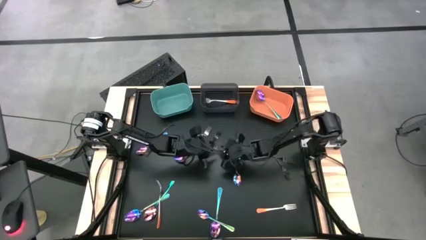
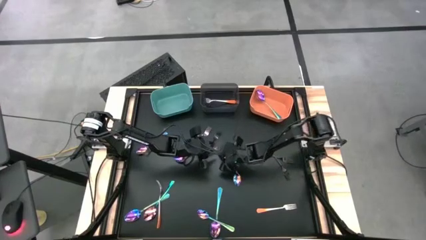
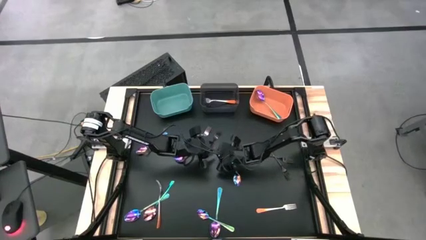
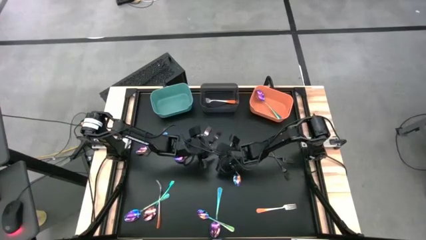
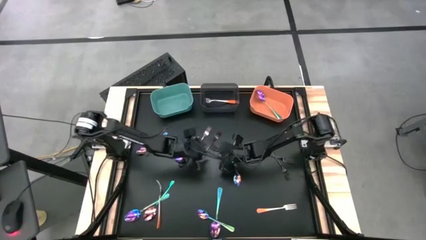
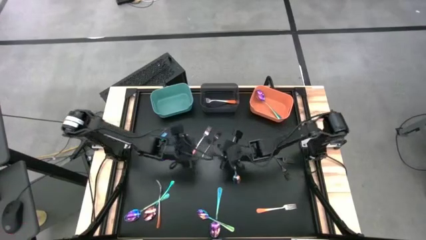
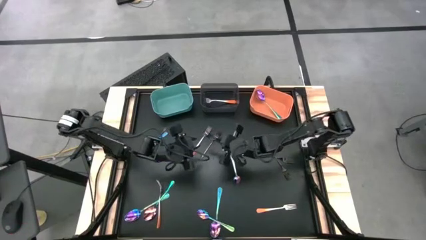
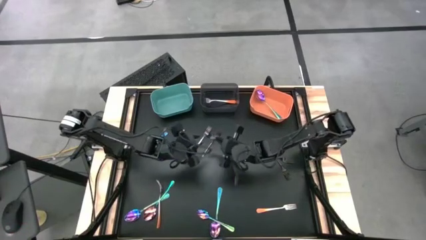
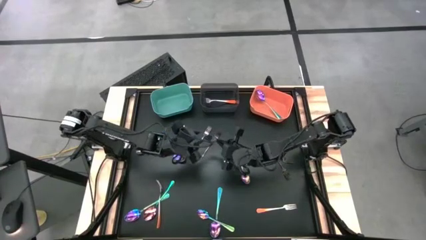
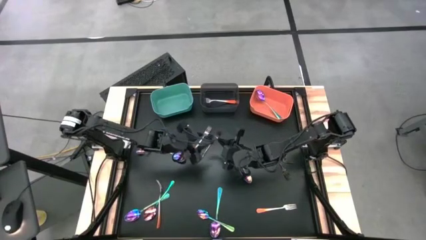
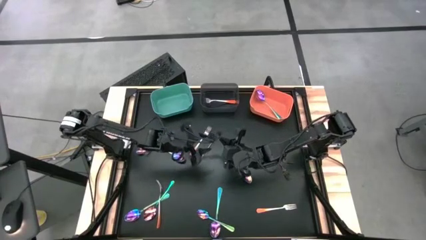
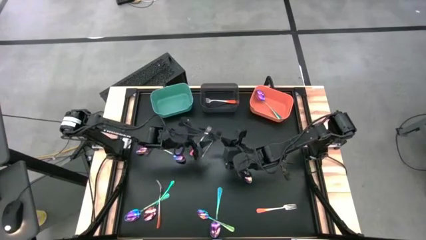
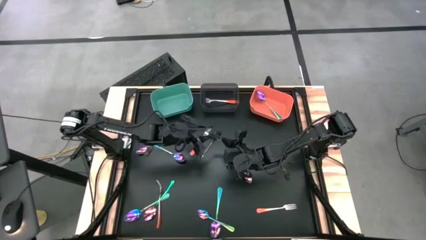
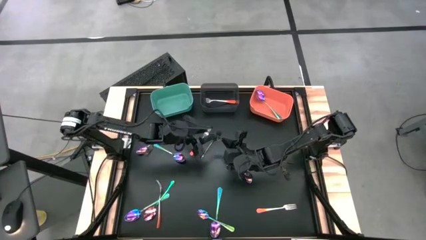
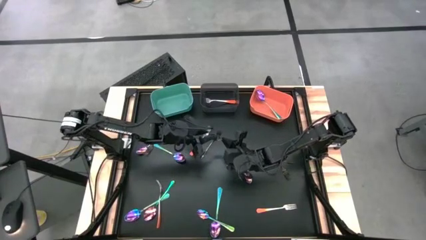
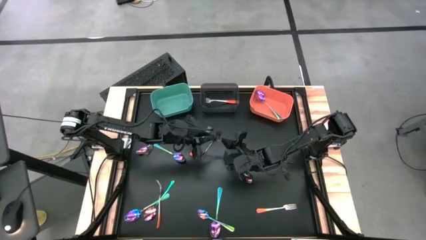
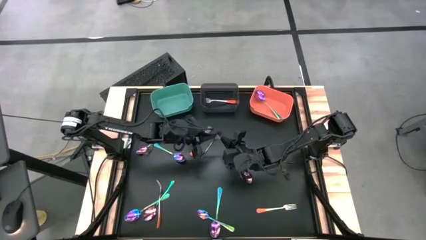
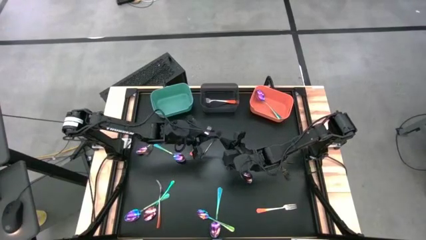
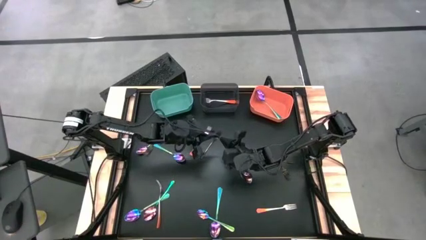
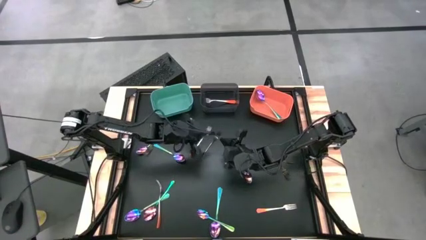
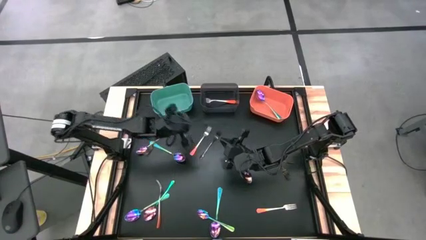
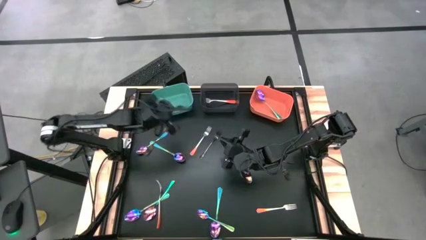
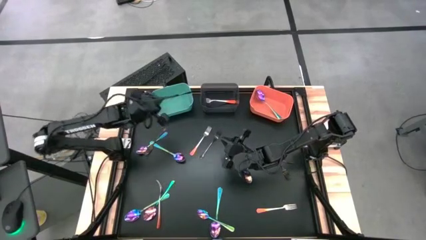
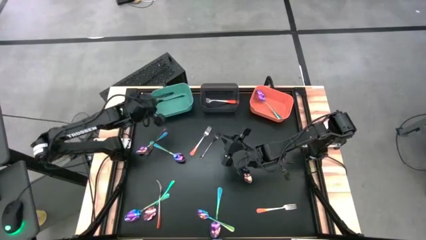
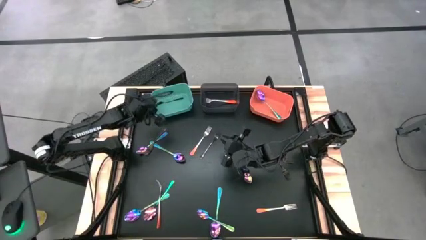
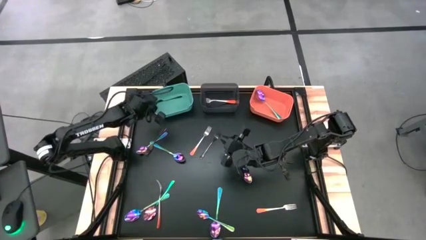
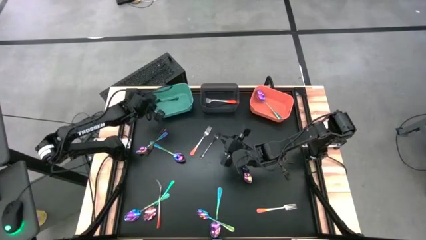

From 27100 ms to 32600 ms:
Task: Sort silverware by color (type)
Put the black fork into the green bin

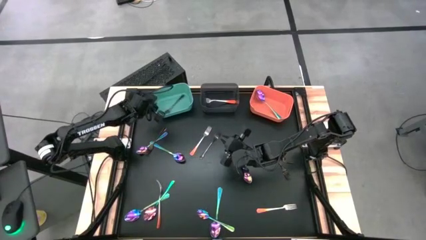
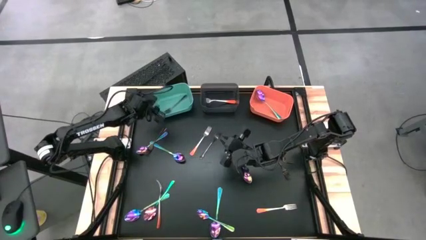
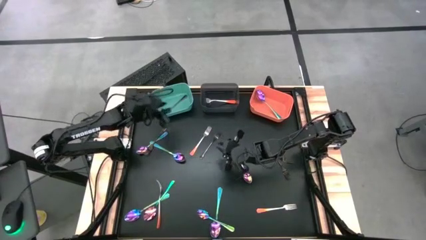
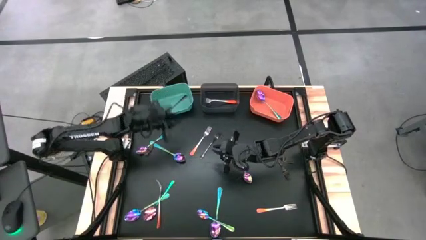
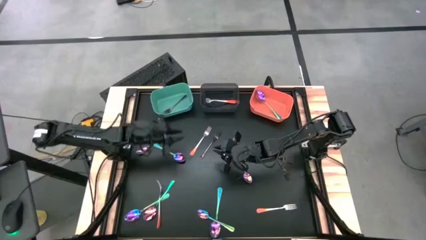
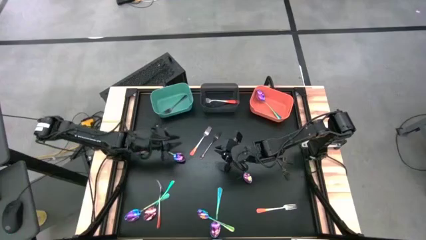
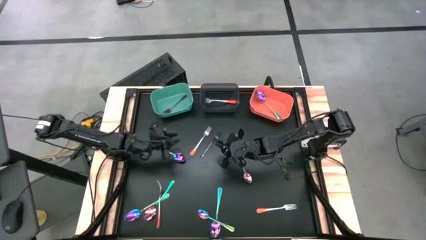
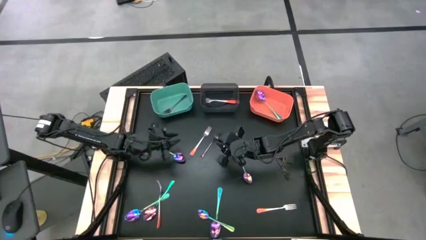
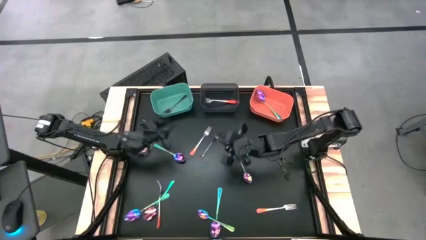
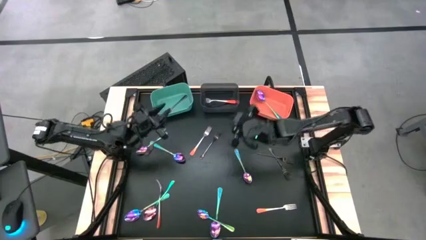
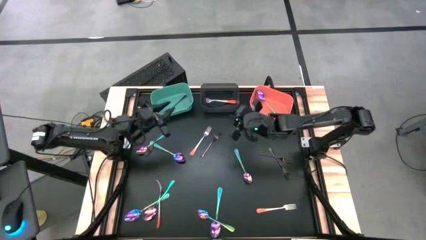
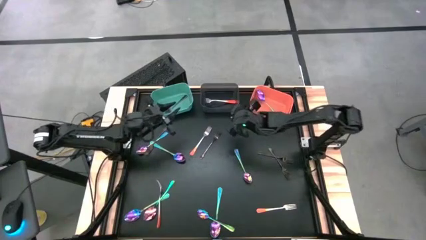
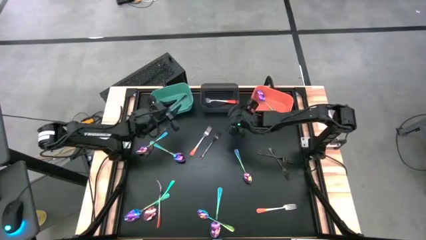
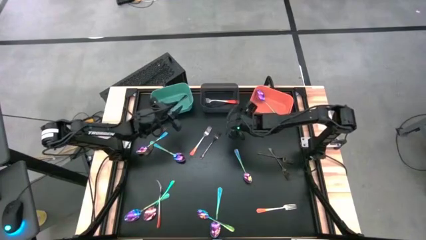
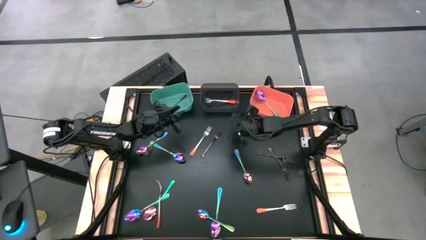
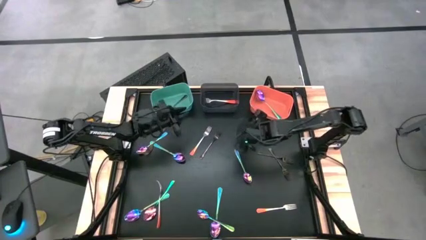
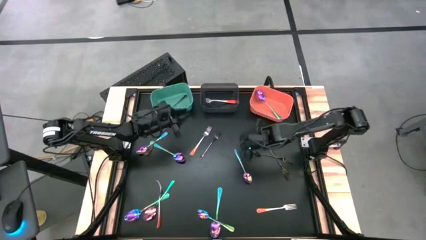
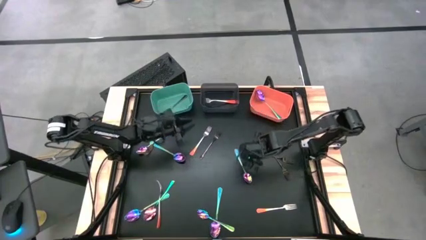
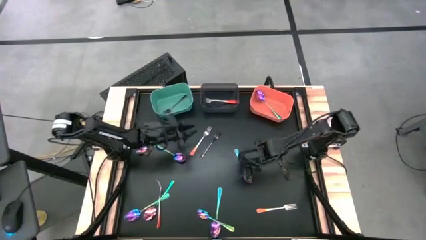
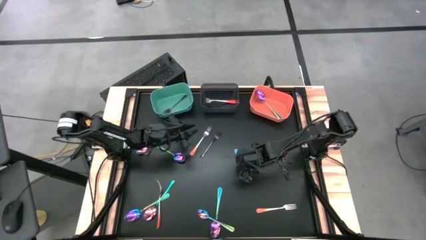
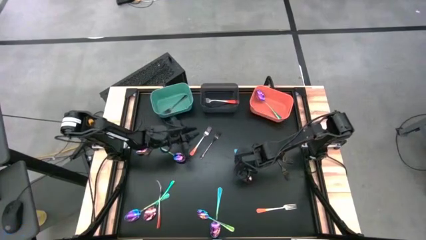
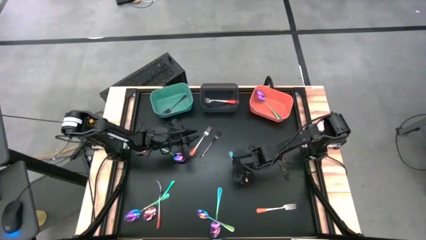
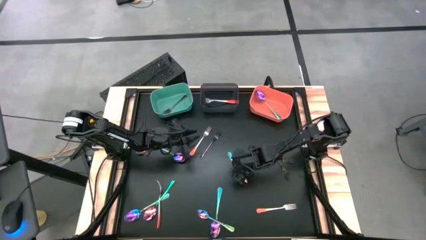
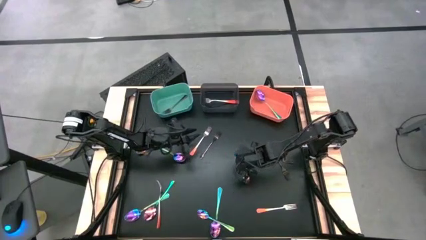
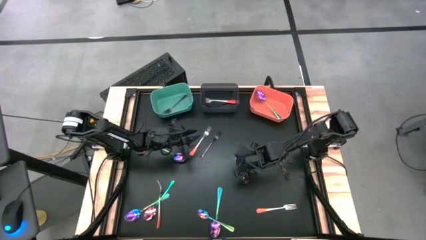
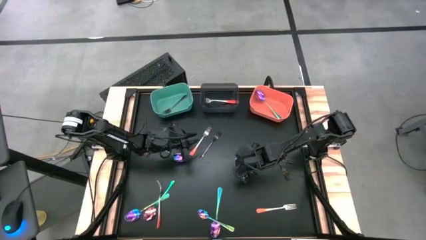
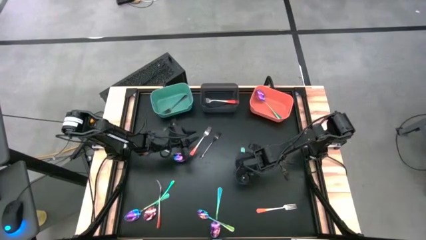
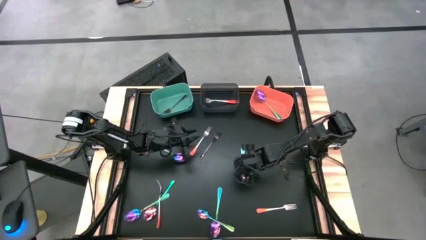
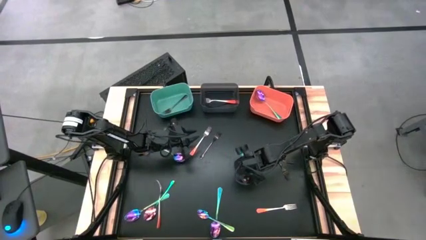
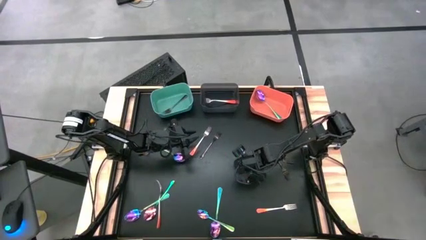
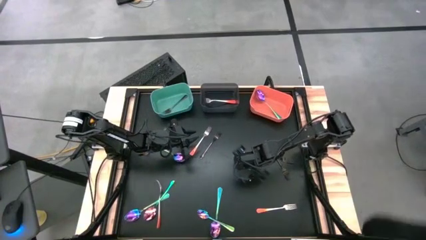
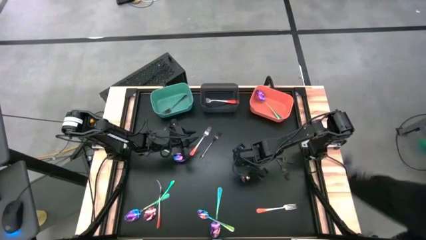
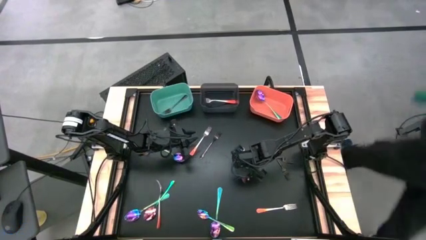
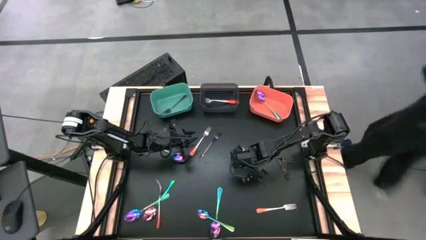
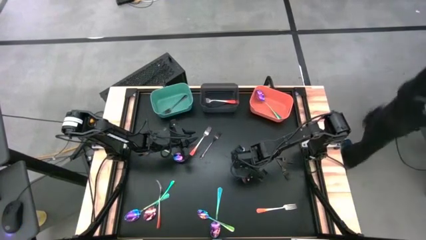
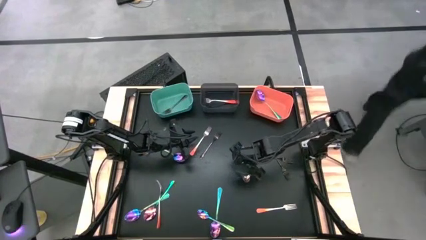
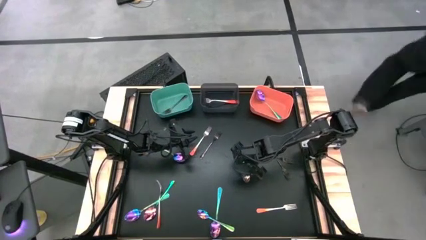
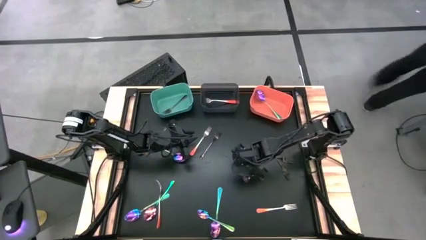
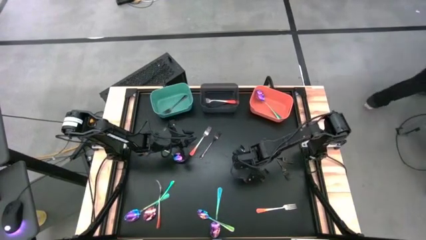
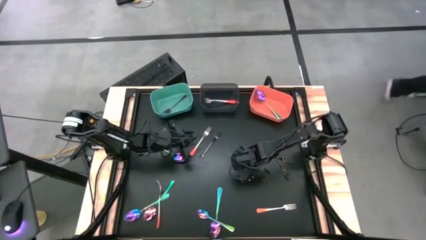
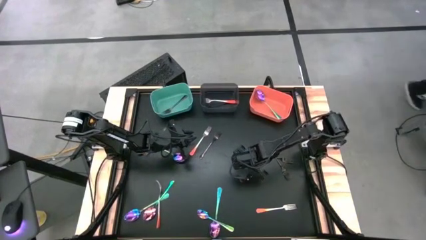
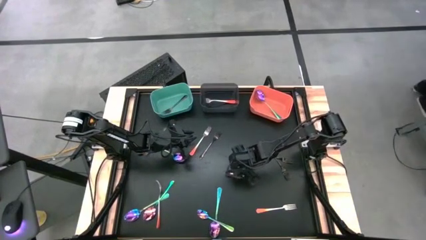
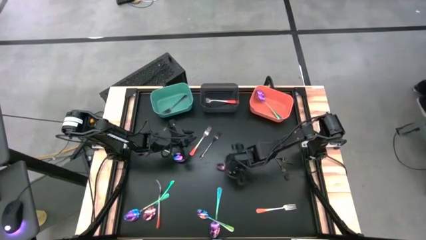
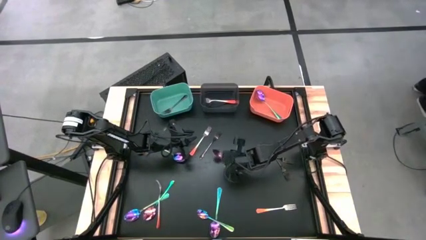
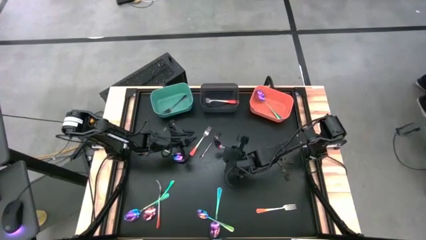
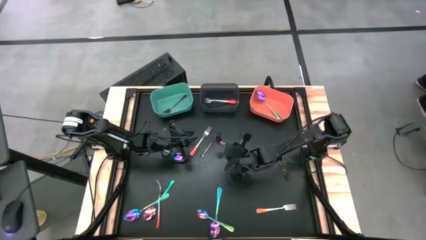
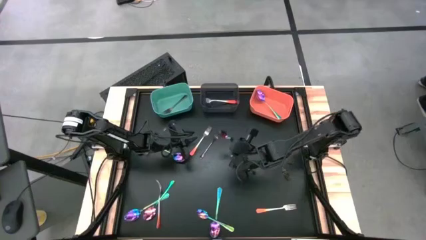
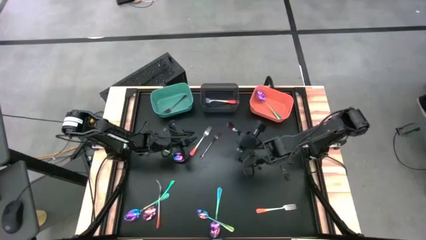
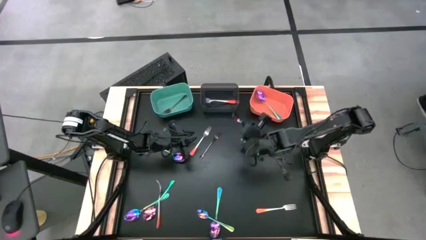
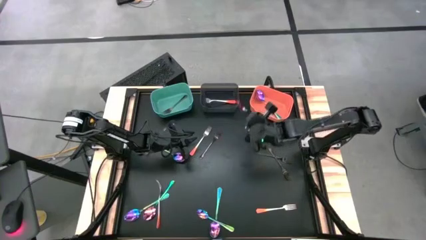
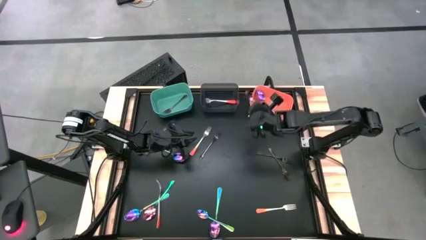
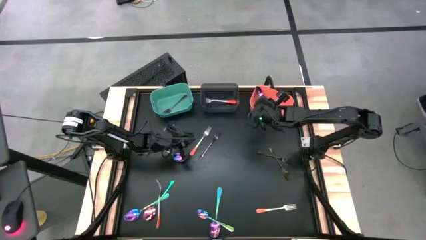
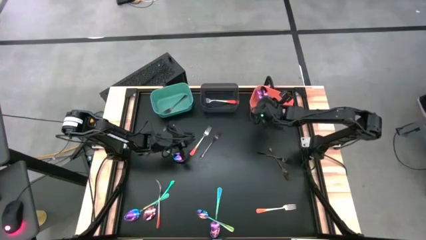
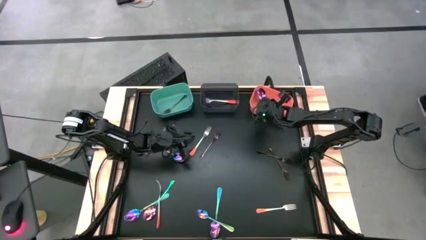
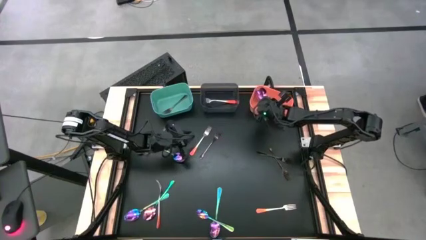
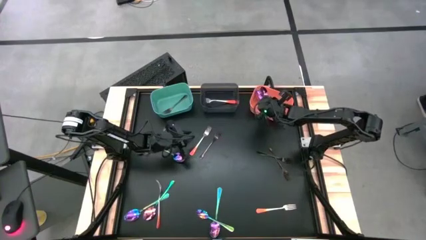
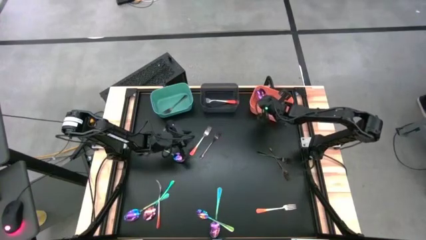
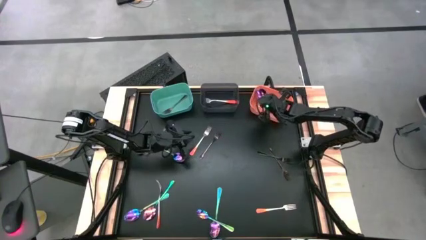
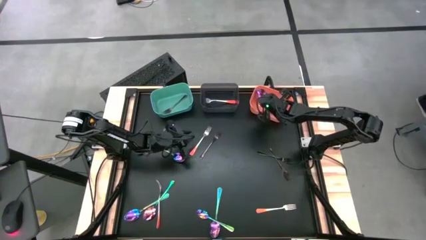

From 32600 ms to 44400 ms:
Put the blue spoon into the orange bin
